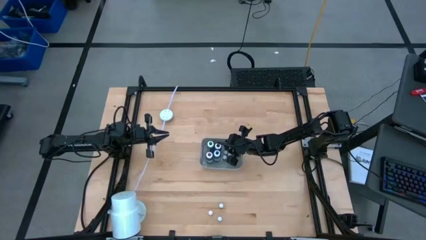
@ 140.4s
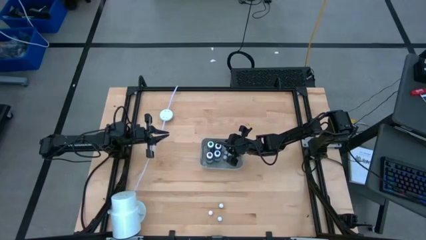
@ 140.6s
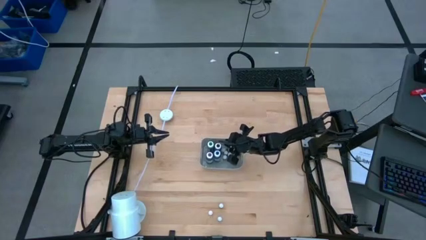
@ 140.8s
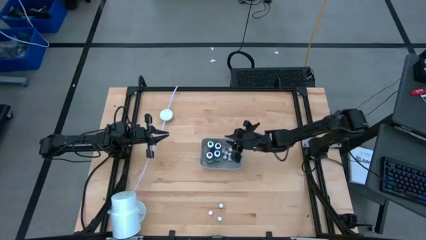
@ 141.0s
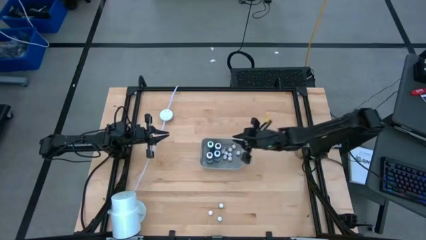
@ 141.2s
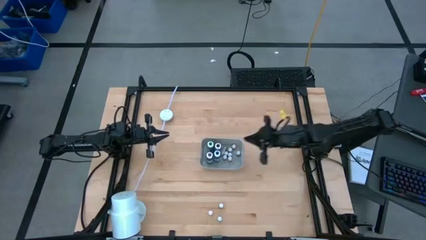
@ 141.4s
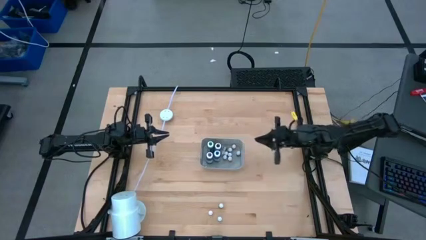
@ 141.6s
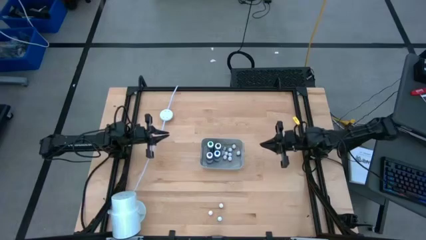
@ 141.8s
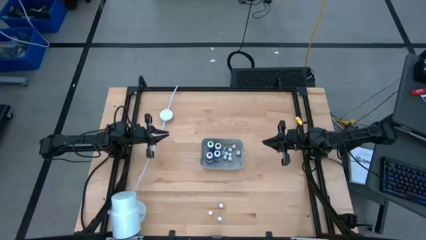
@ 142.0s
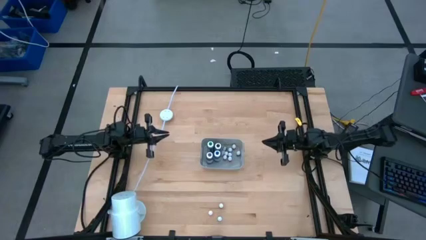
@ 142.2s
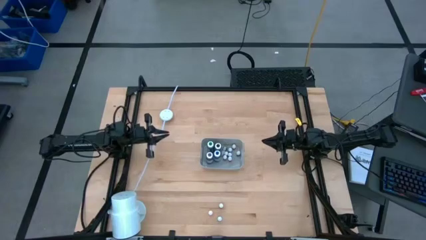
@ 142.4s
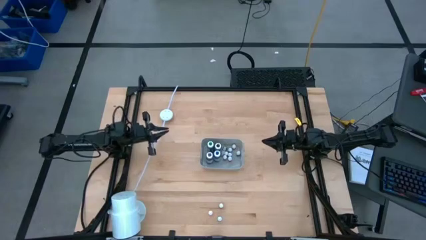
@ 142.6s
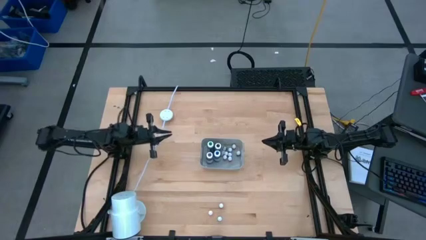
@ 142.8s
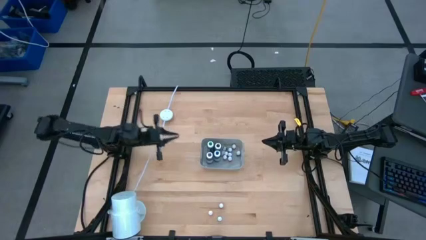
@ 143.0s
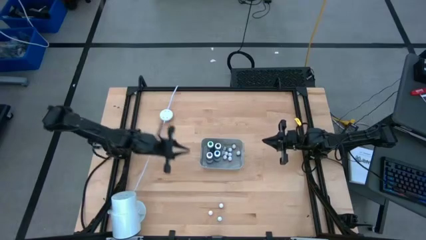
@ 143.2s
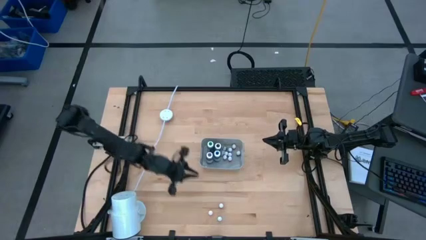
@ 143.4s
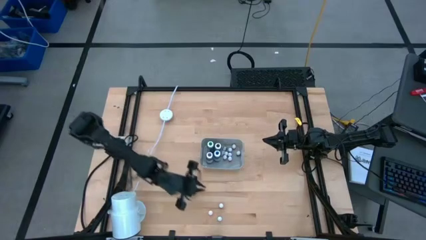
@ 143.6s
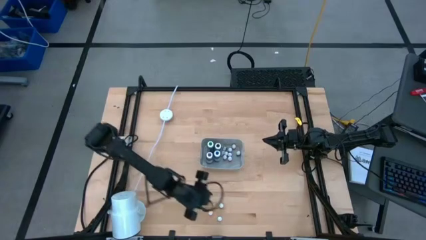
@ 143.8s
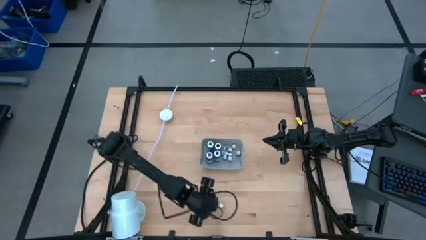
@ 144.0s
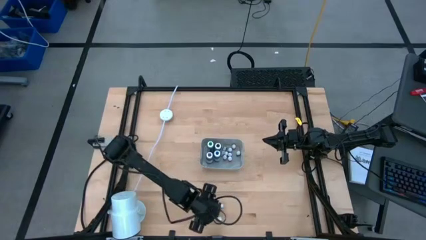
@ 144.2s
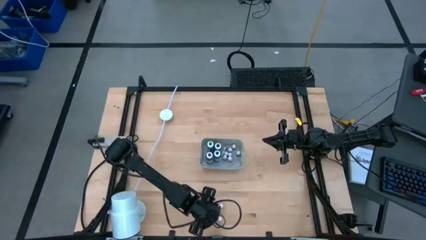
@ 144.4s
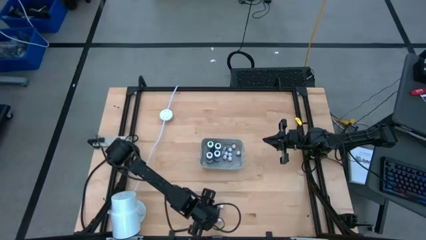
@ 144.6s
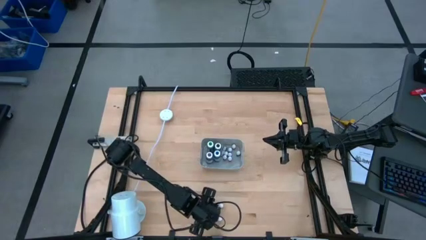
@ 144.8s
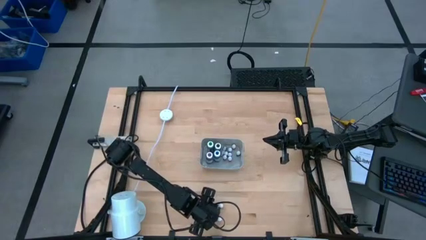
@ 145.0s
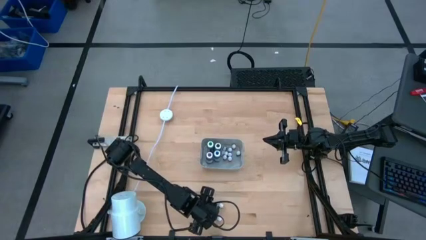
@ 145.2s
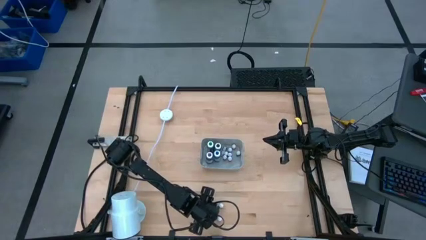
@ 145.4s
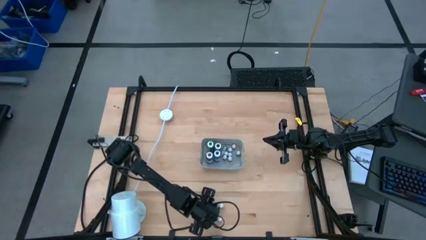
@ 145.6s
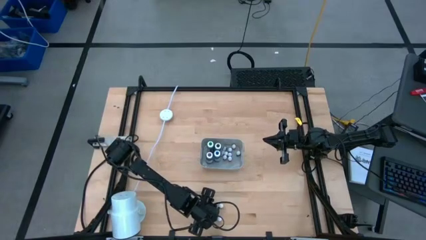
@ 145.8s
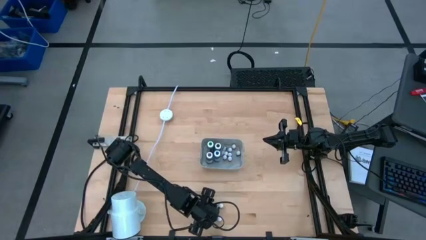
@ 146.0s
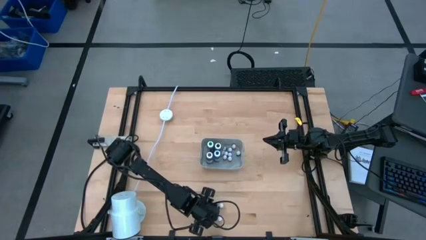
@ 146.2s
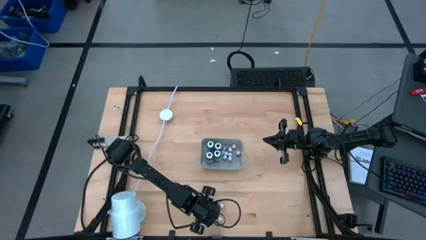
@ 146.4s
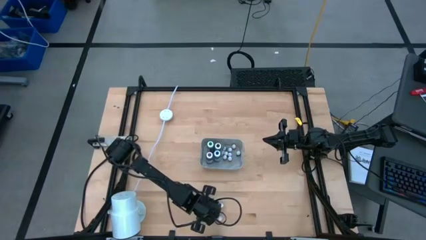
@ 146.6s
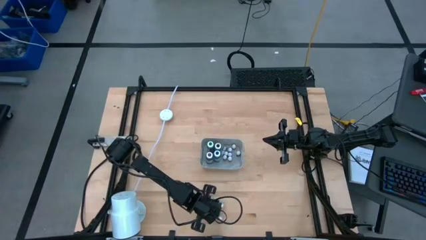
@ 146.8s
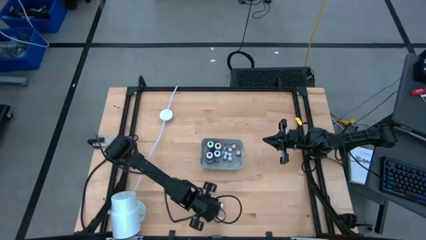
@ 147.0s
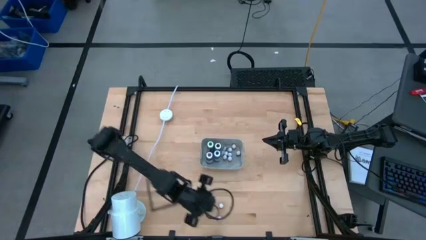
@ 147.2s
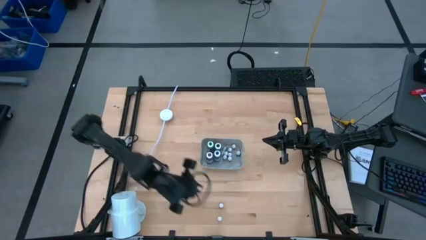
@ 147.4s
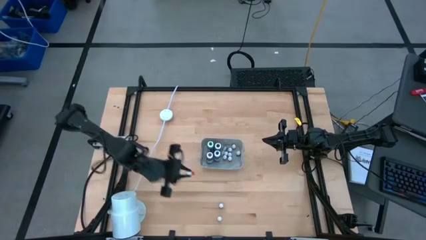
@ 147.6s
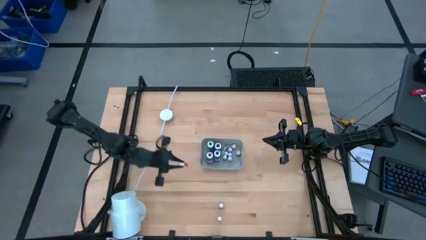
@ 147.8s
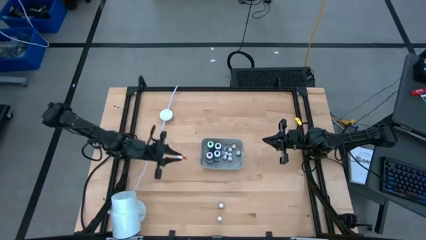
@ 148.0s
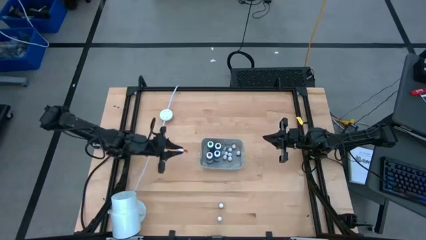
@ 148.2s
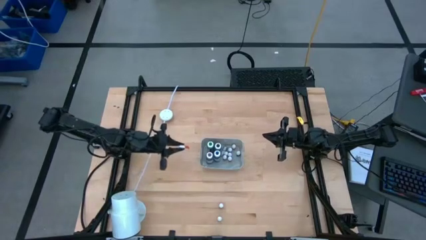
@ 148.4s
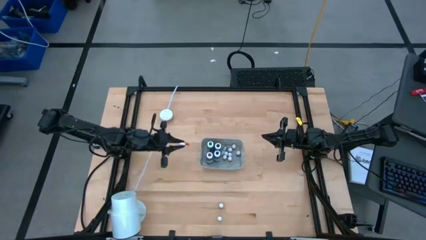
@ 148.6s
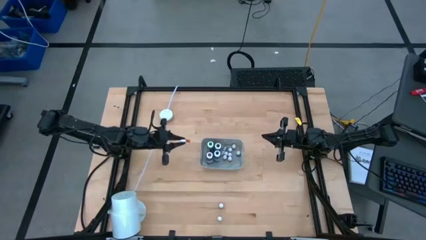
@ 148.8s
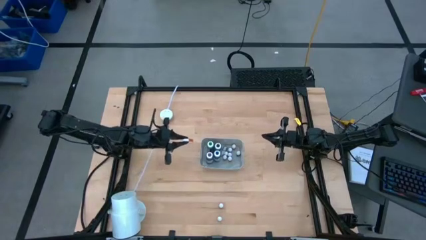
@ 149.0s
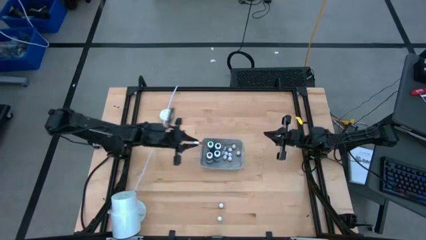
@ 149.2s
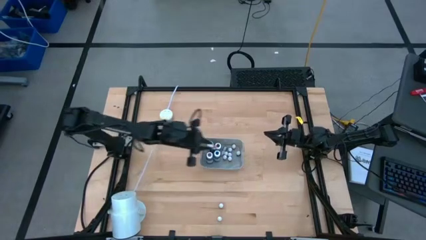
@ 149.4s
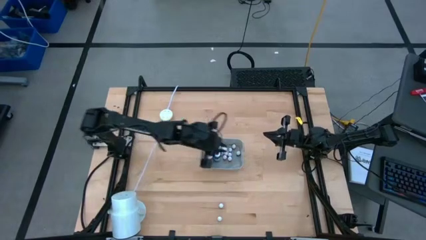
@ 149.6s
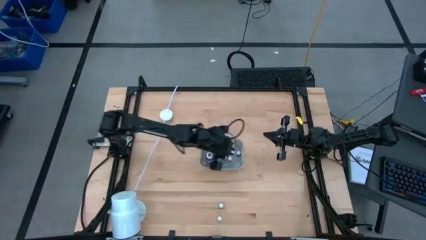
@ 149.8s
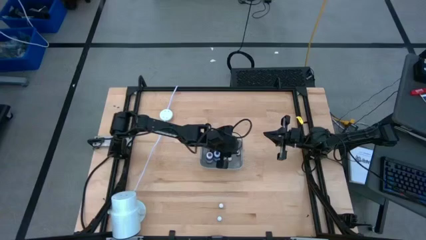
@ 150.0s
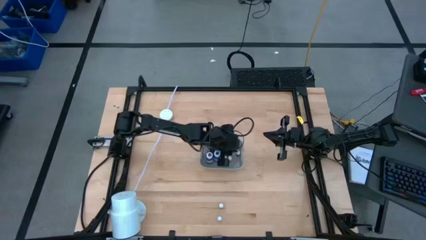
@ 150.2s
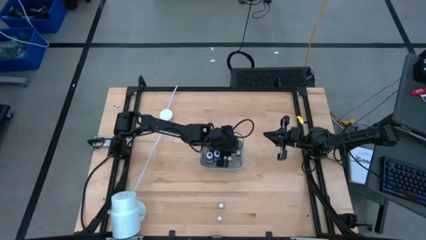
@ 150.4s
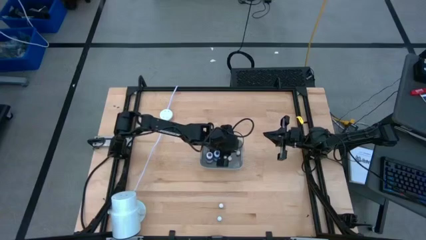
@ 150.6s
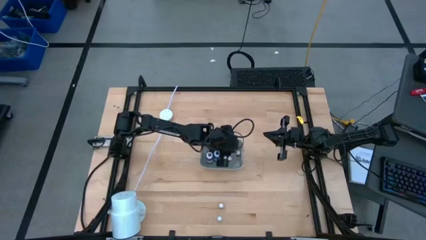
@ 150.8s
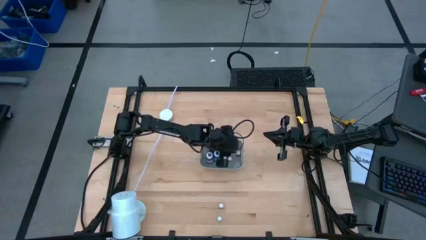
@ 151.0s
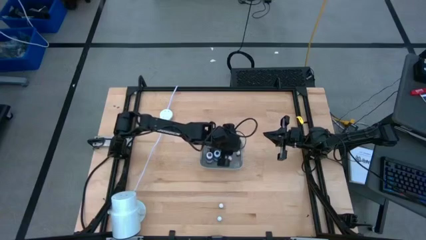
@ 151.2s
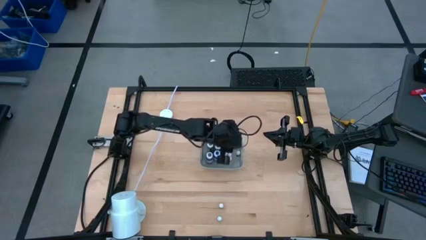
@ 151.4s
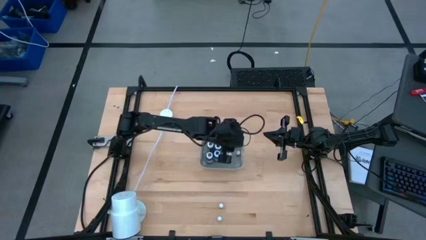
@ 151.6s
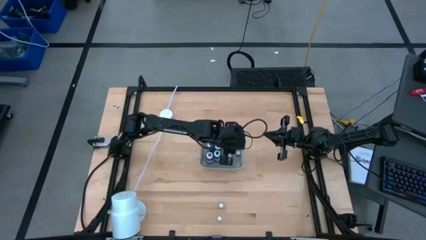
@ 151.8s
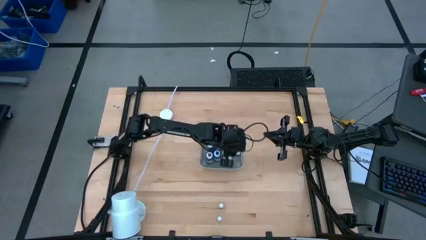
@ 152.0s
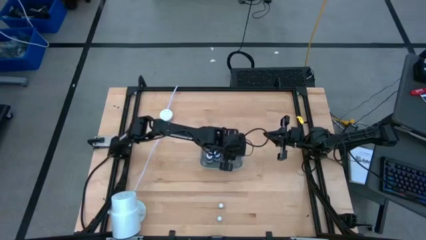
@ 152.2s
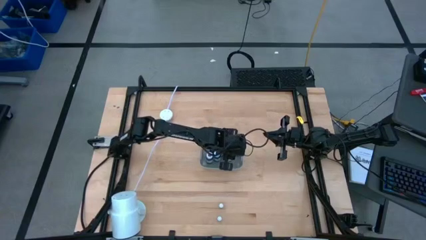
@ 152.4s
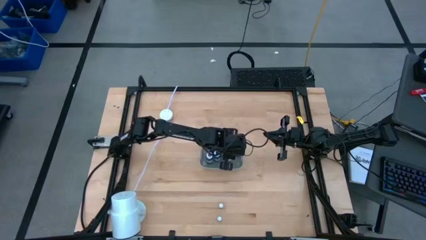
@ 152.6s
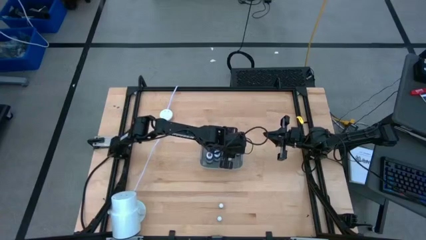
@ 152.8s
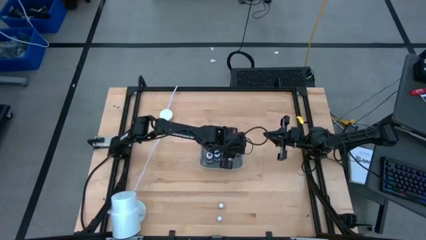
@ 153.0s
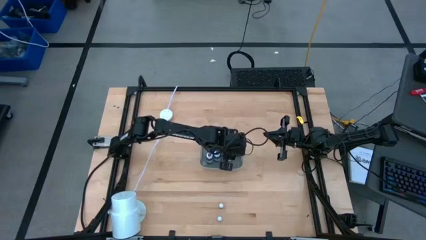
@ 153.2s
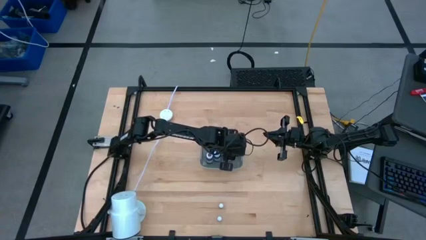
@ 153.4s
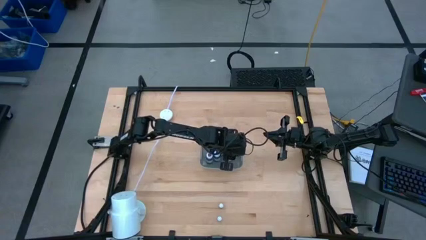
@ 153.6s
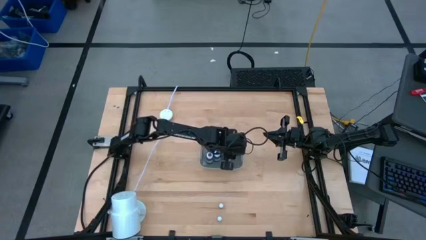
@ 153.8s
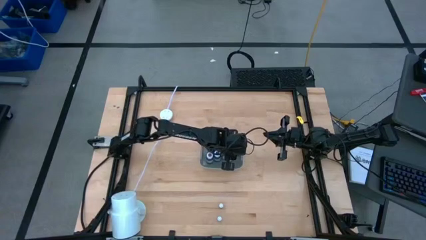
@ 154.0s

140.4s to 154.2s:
Task: Pick & Place food coloring
Put the small orange food coloring bottle into the gray container

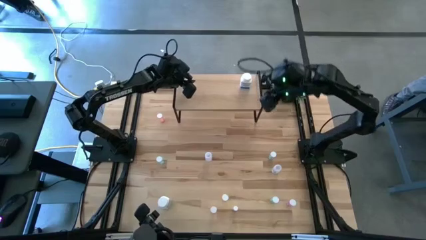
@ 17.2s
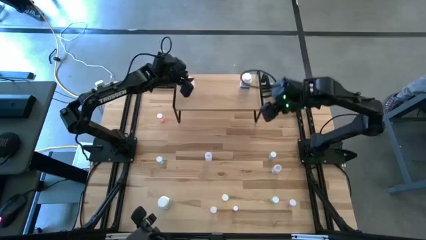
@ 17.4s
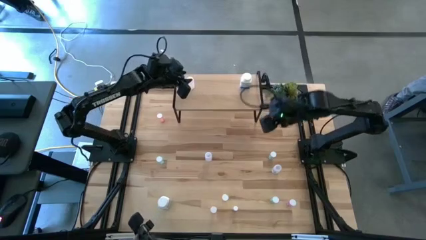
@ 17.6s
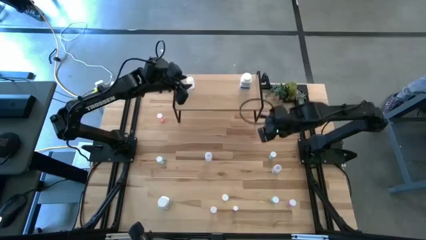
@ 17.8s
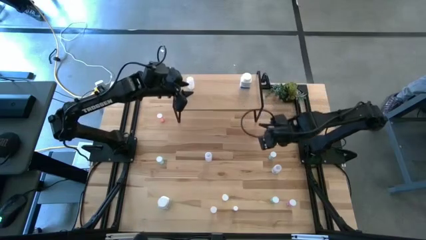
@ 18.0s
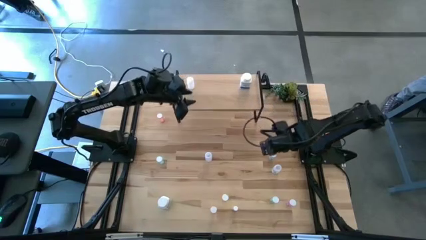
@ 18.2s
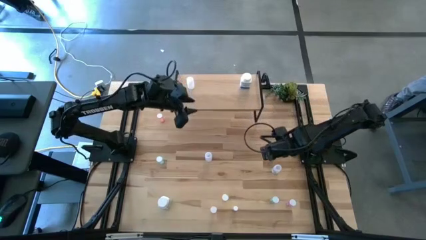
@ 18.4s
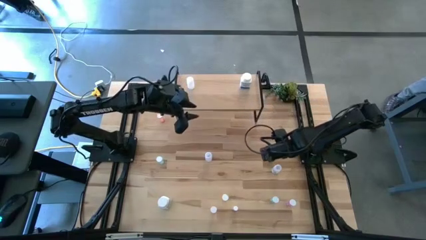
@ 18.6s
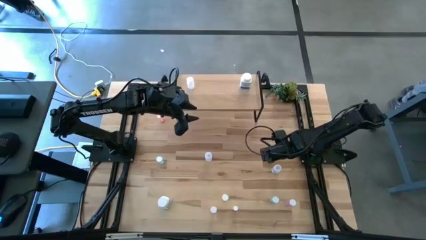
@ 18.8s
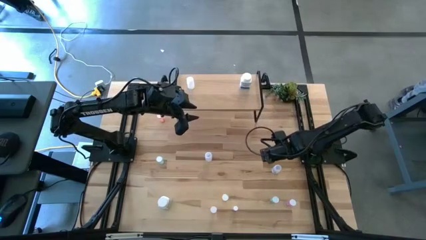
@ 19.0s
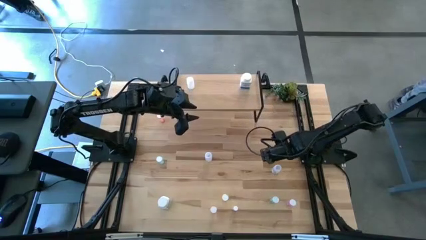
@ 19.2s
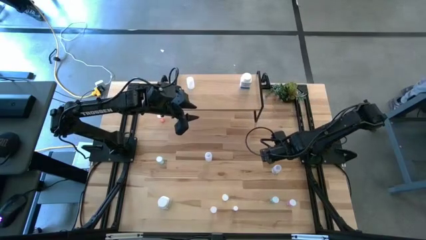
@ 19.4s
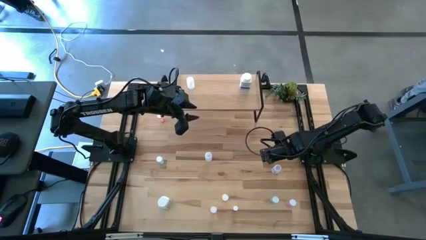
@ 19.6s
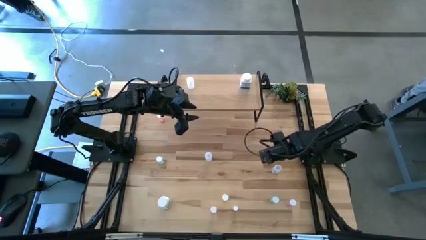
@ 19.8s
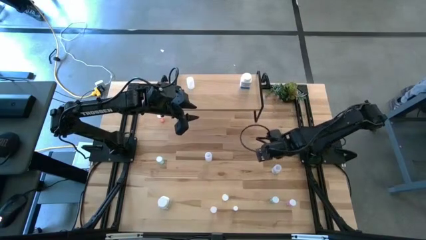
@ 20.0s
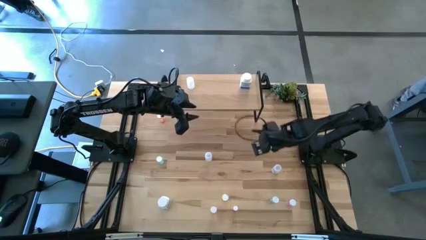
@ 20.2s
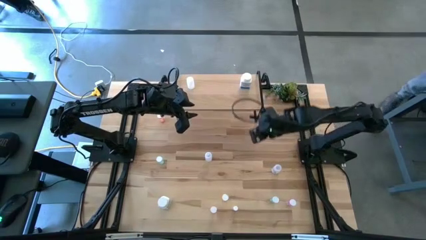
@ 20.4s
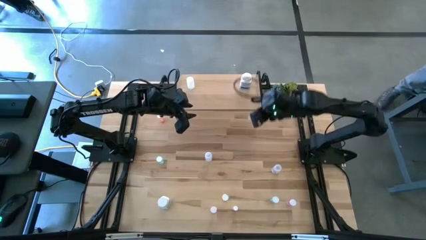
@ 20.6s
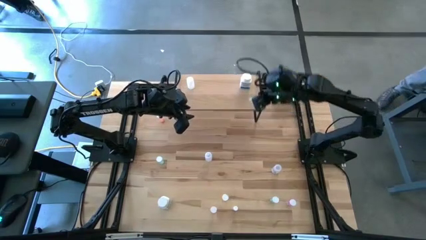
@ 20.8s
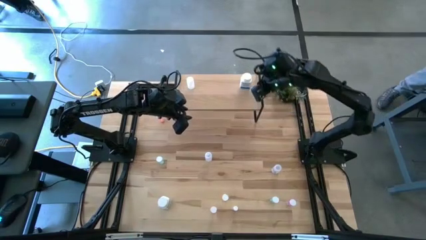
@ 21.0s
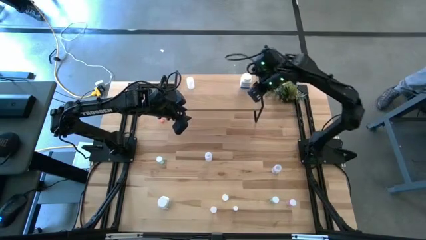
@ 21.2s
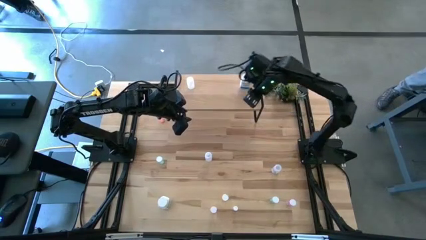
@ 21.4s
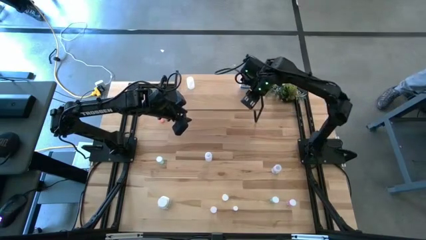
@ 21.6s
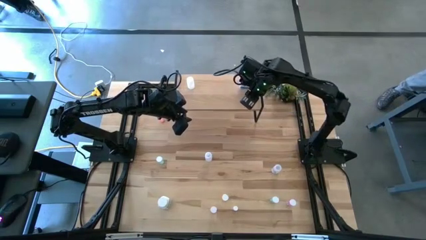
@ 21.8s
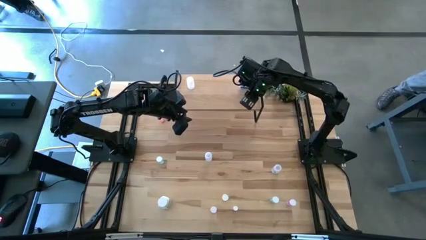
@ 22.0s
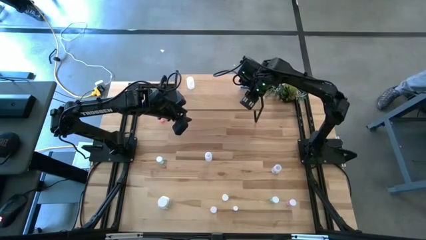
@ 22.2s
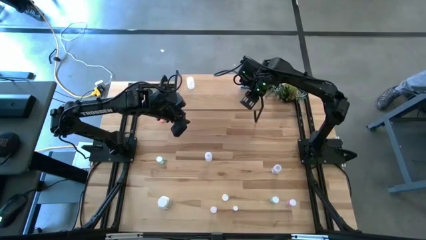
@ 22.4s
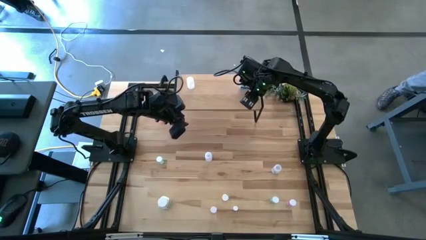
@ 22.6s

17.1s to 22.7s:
Task: Pick and place medicine bottles onto shelf by color
Put the right green transparent pill bottle on the shelf
